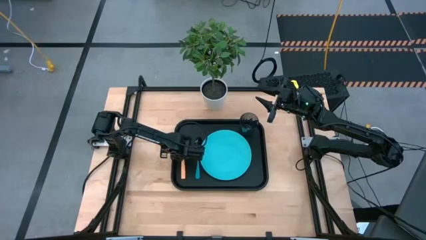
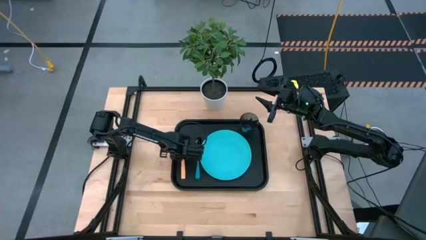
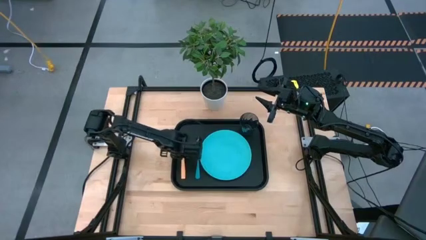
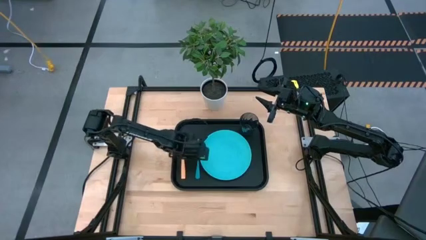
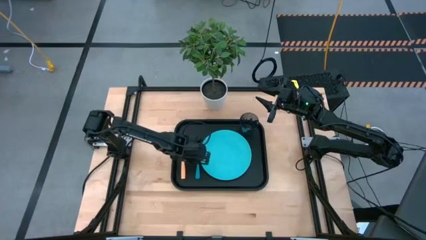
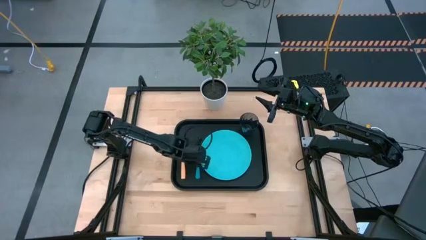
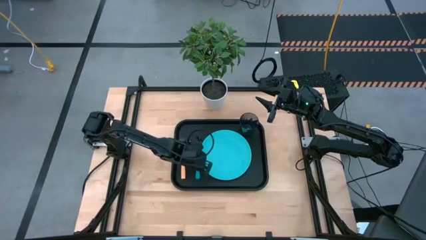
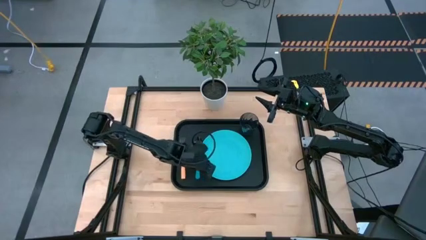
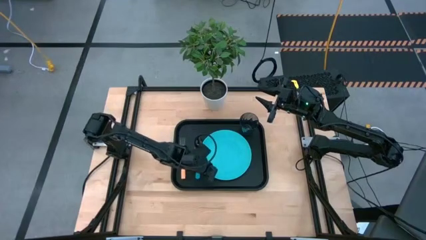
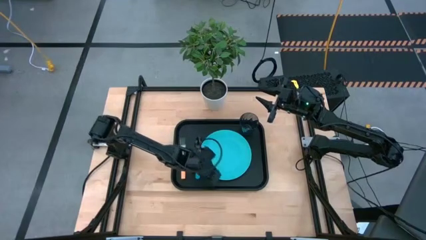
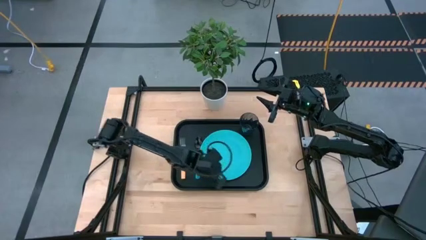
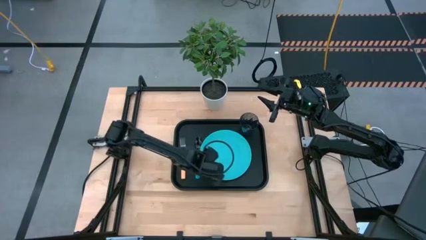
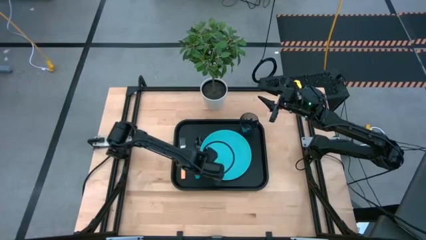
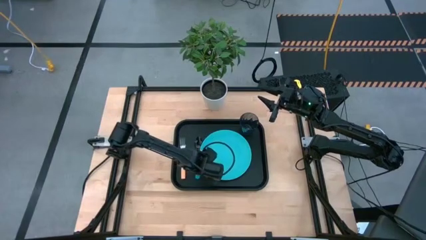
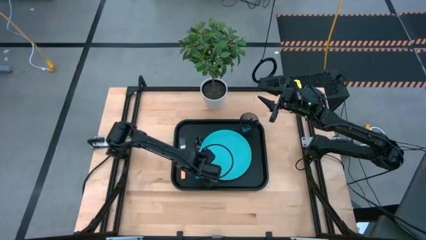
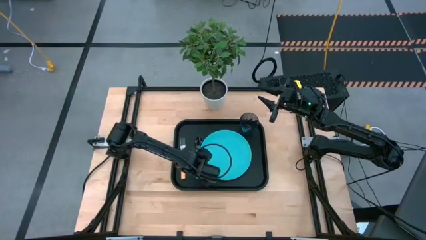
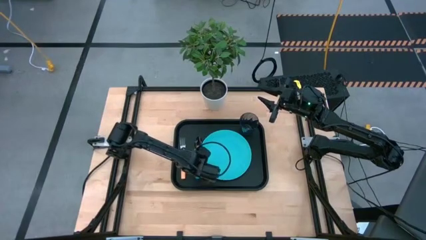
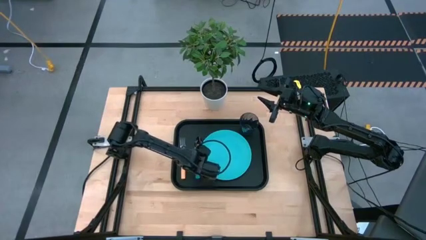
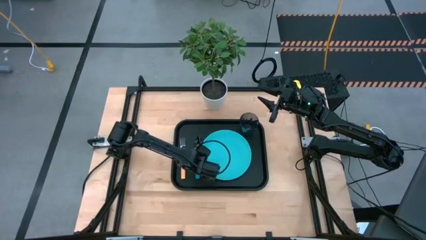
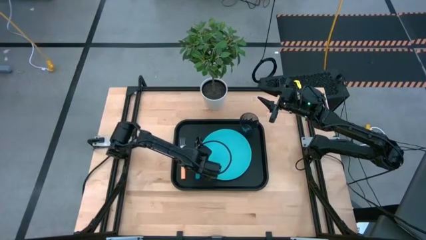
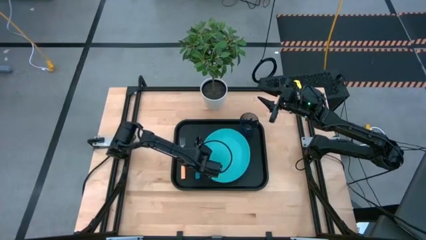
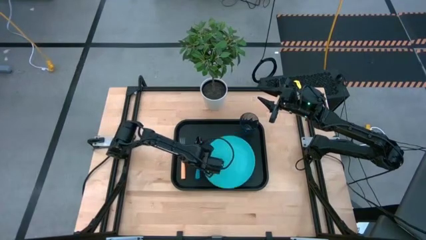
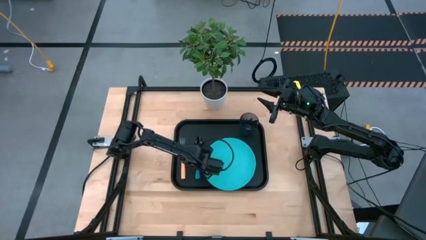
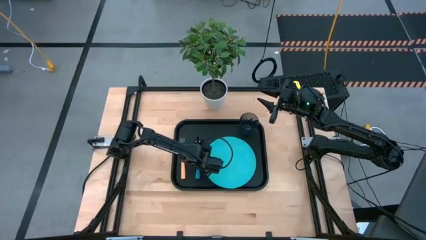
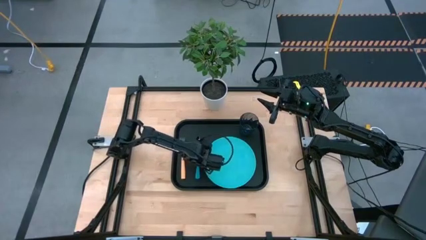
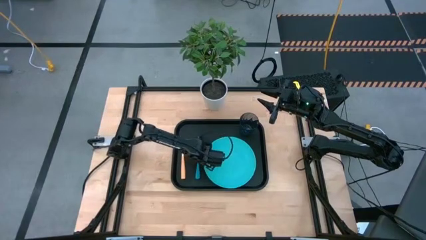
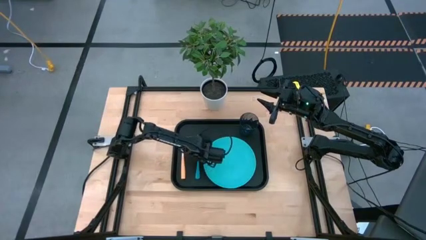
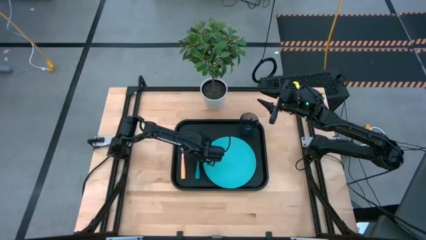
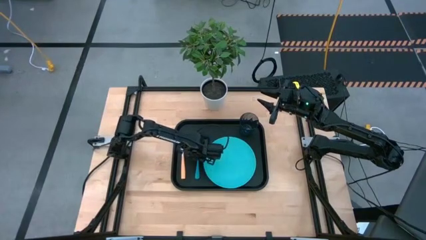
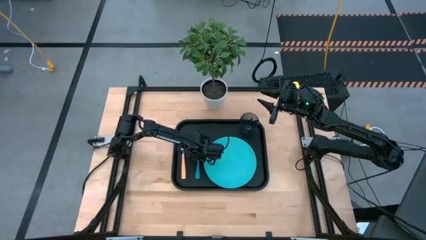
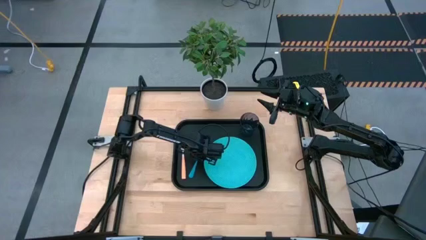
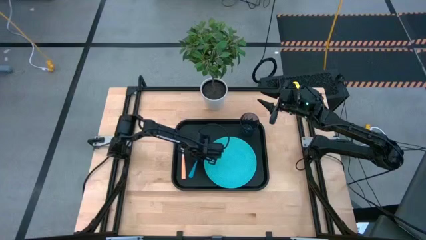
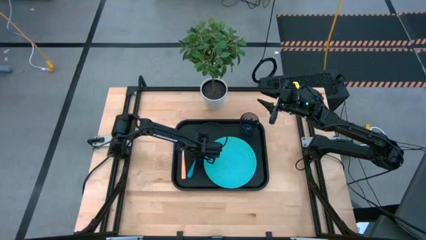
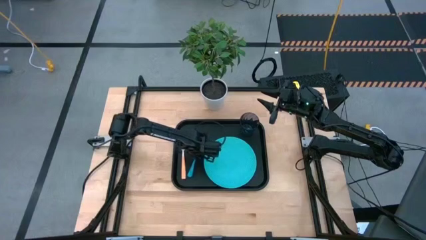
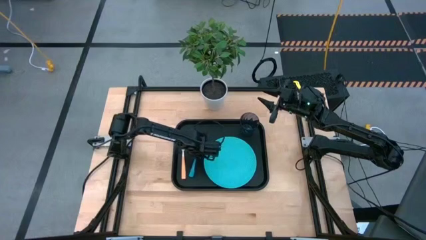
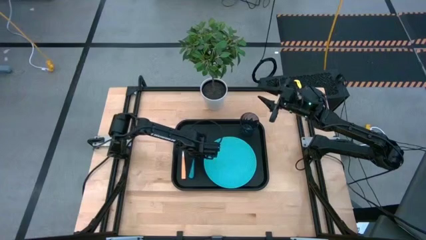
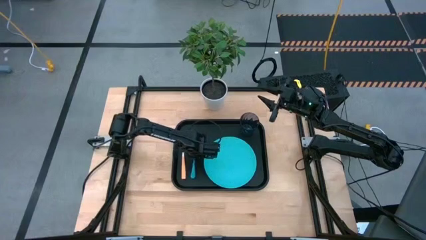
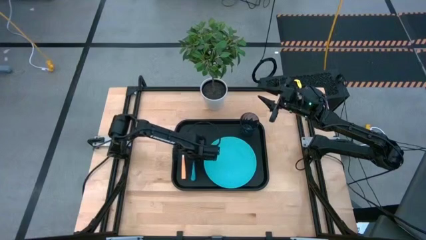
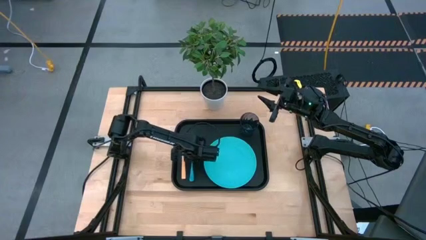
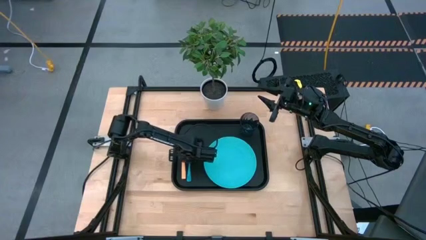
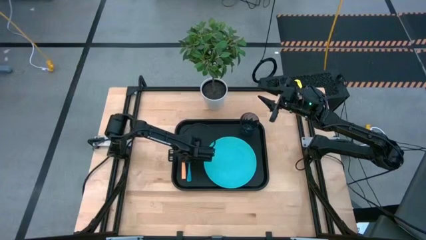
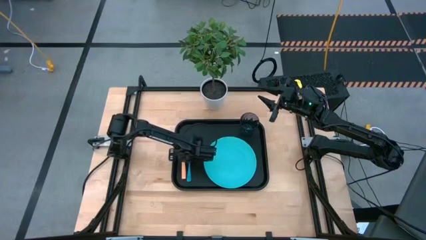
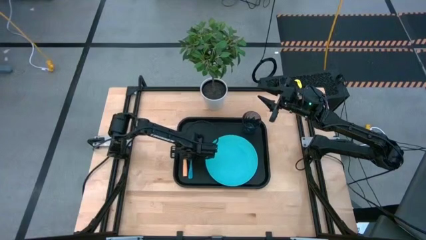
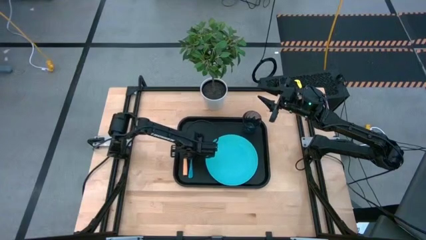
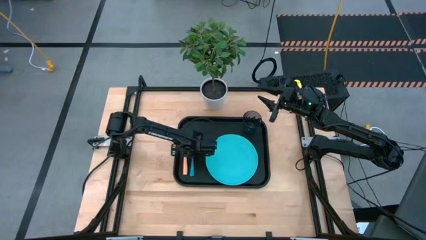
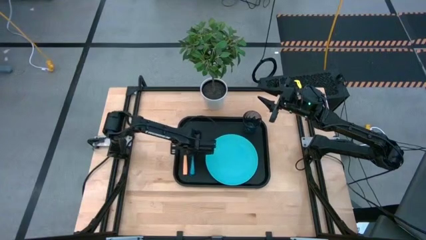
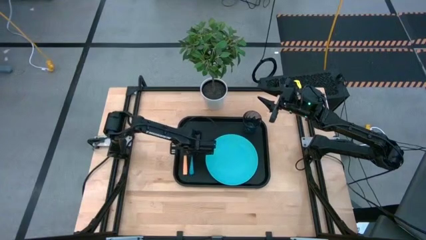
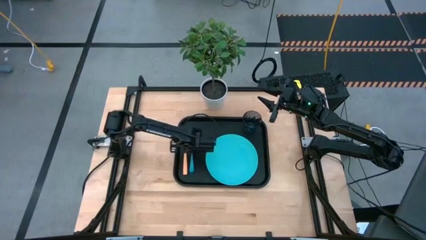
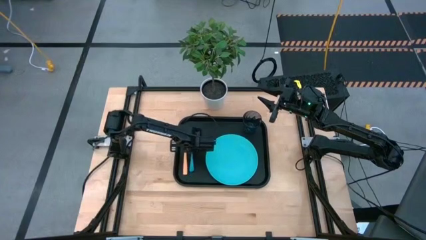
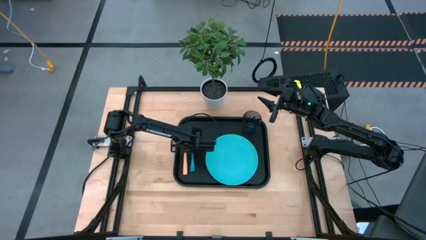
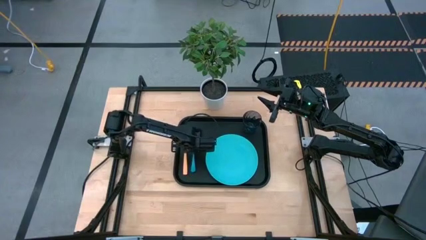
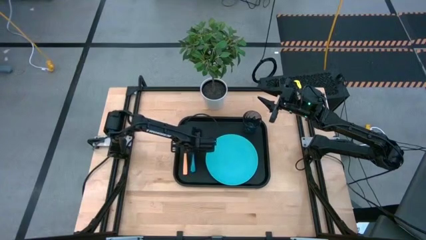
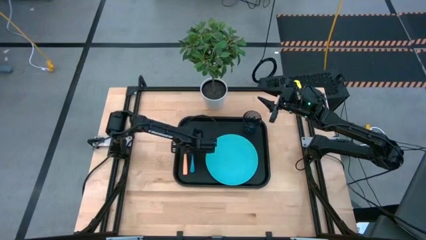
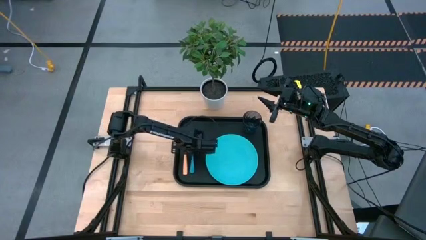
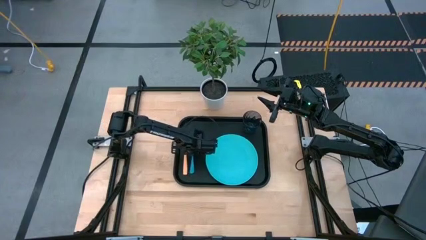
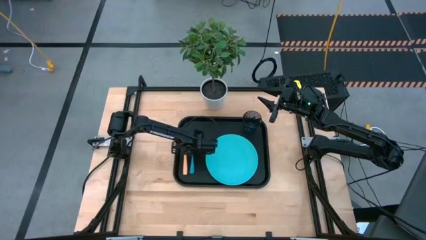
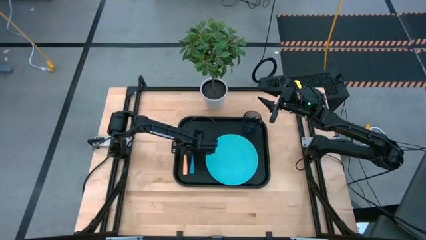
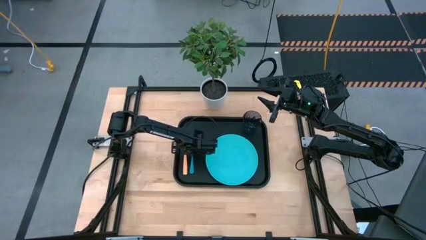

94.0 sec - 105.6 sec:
Task: Pick and place plate/cup/fork/spoon on tray
Adjust the blue spoon on the black tray

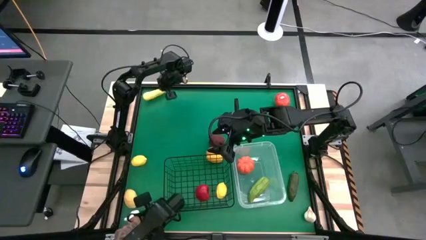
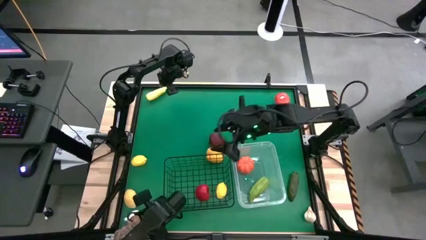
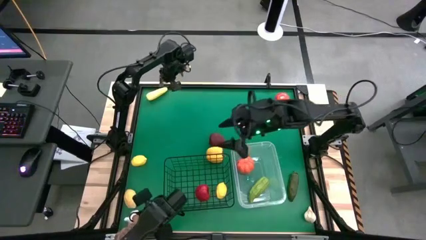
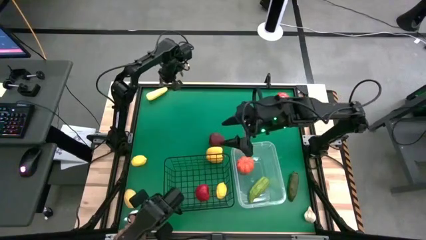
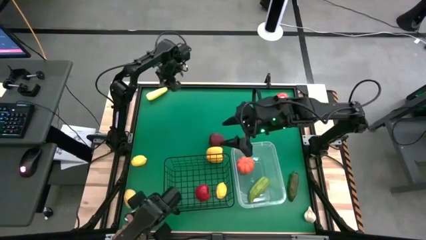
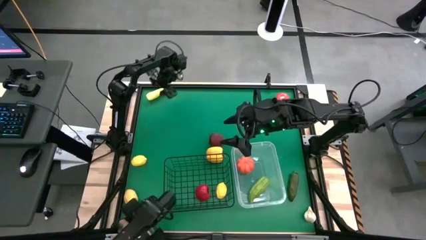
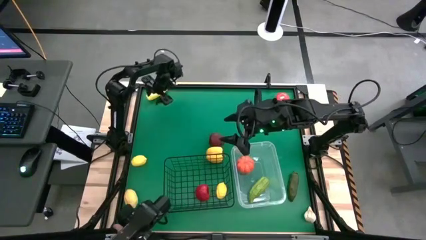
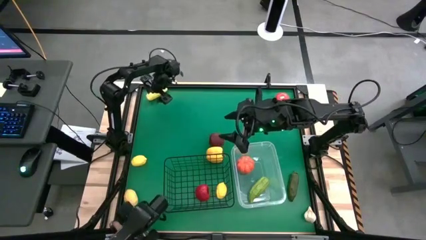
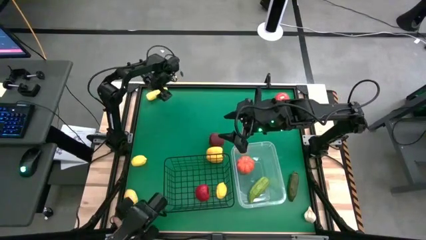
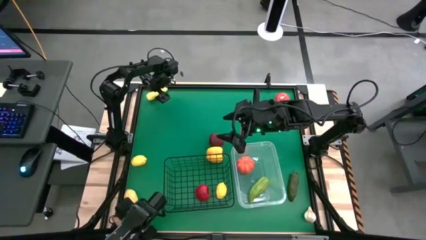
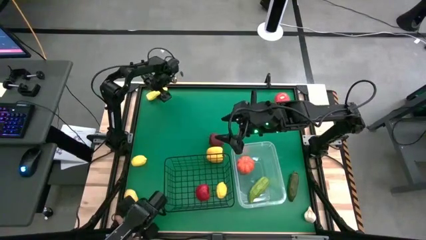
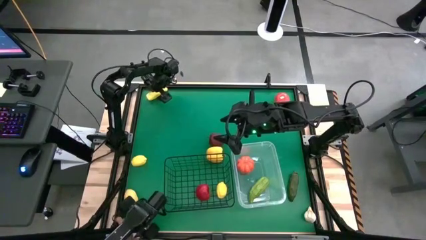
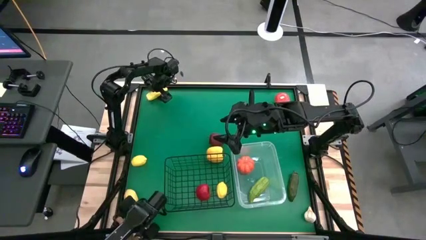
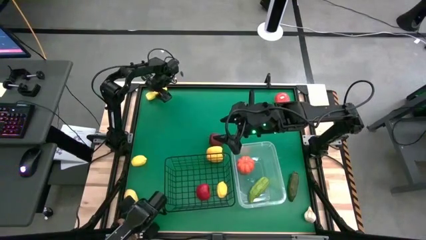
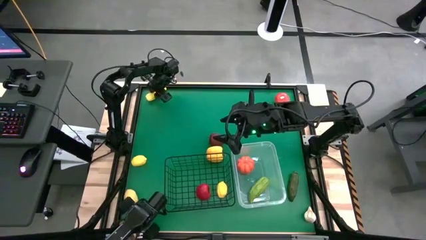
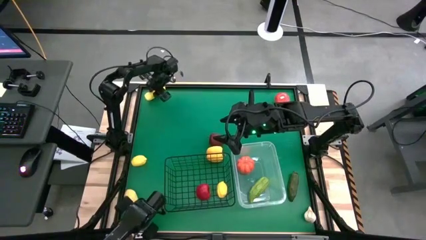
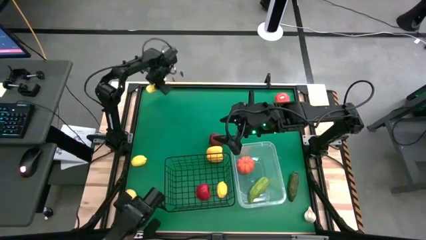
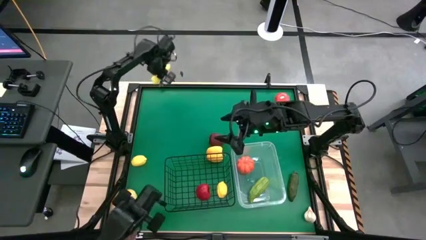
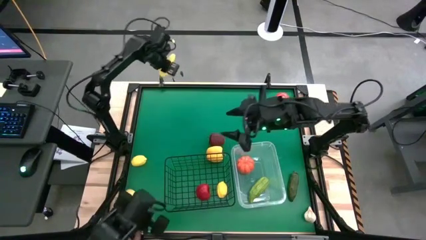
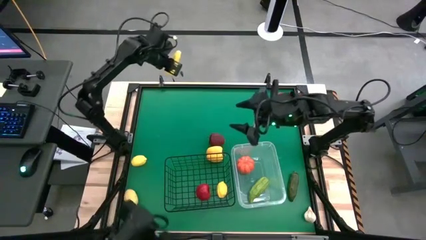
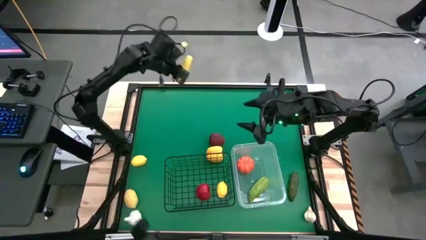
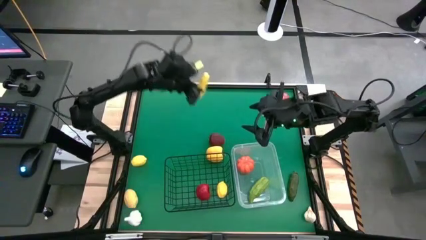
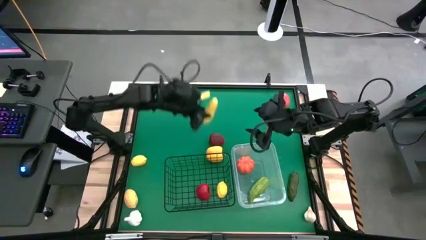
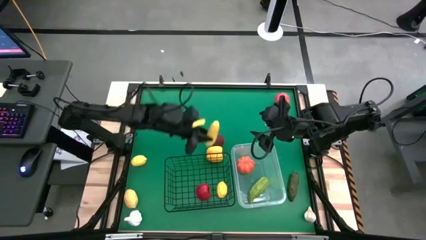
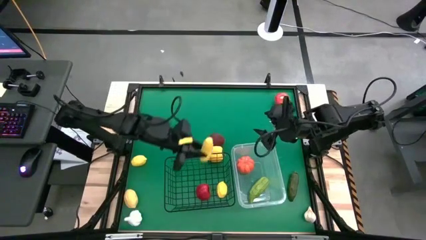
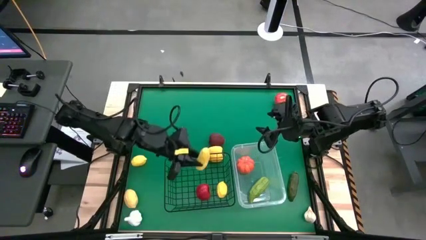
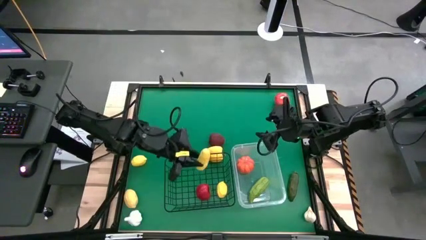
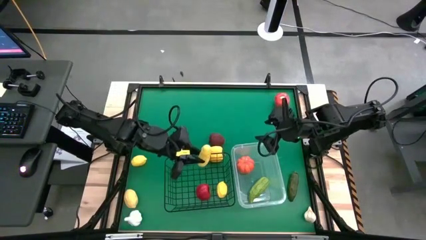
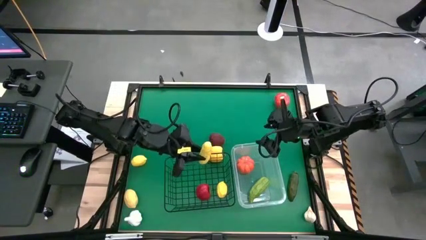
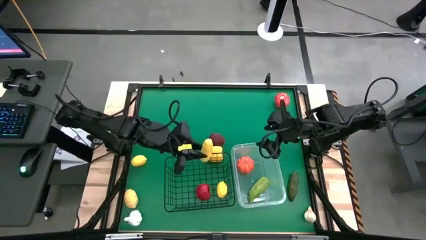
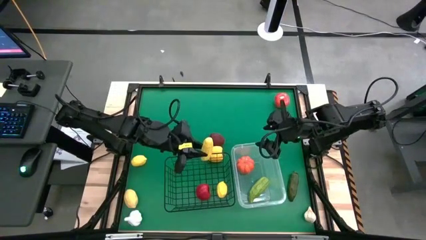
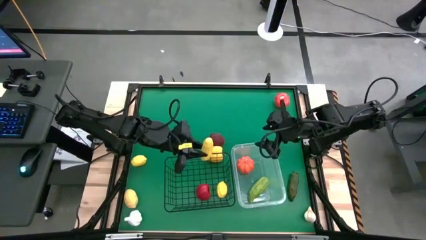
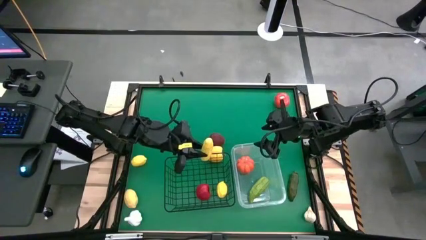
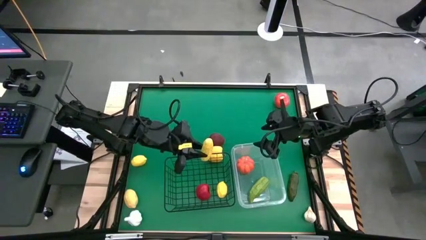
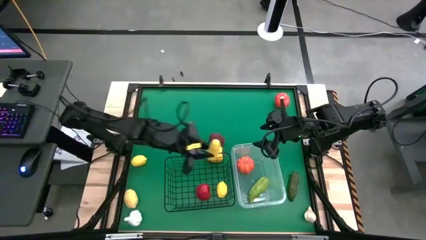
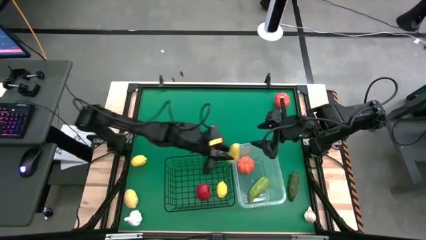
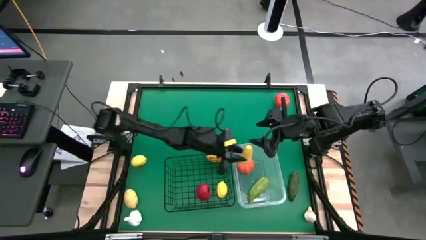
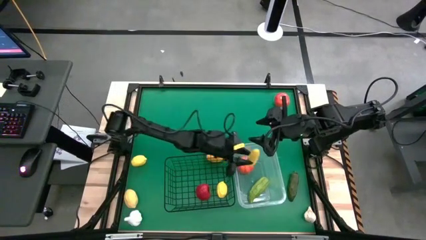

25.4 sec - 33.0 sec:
Task: Sort produce into baskets
Put the corn into the transparent bin
